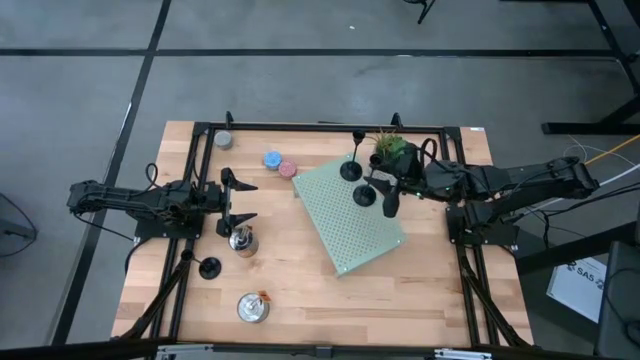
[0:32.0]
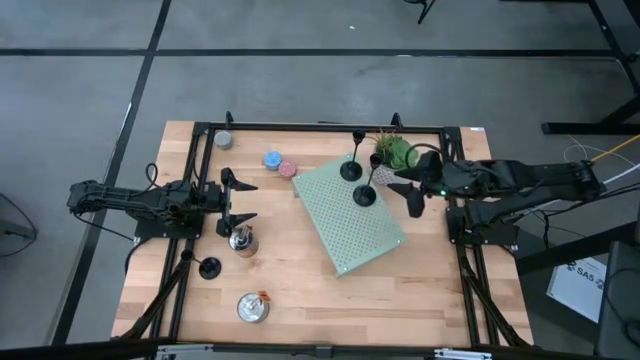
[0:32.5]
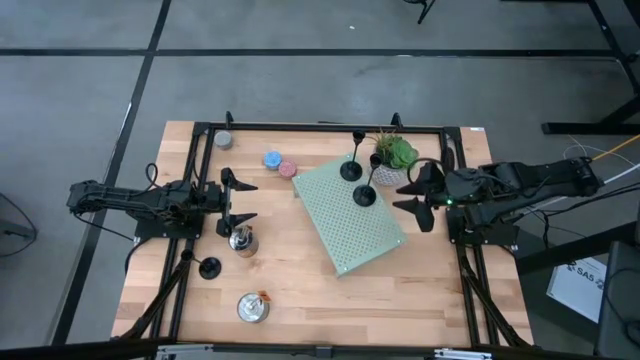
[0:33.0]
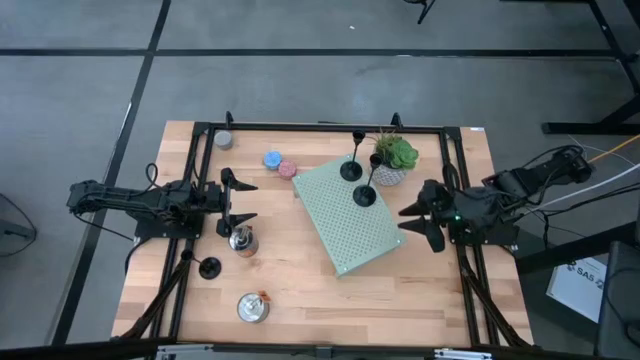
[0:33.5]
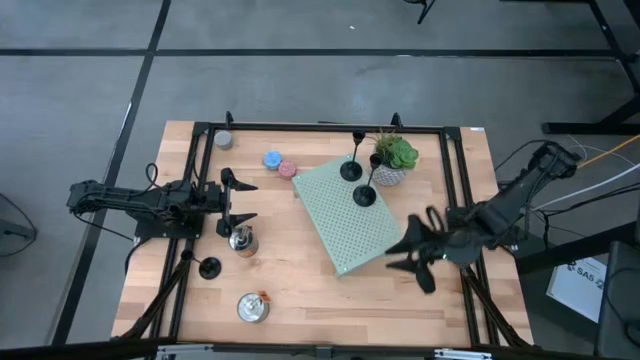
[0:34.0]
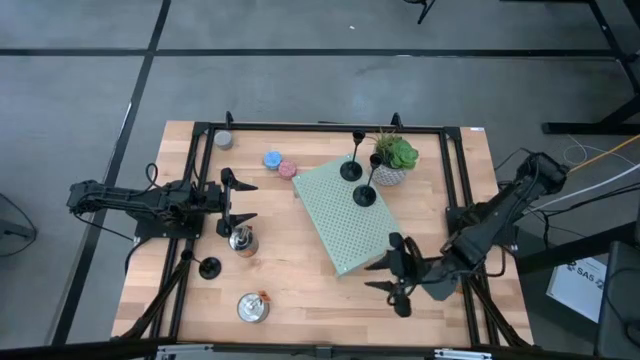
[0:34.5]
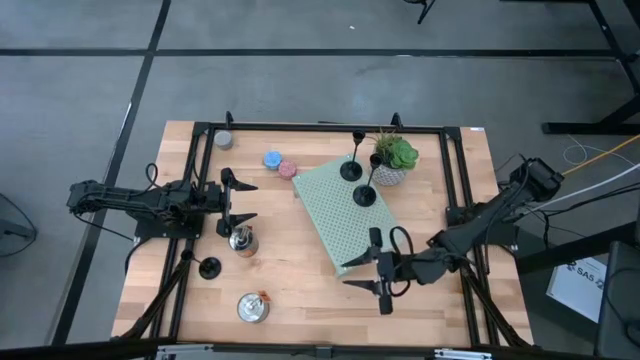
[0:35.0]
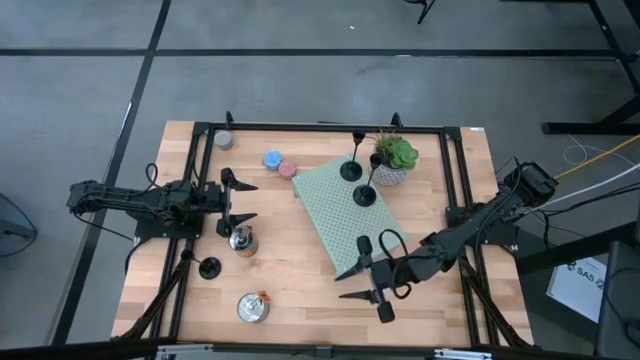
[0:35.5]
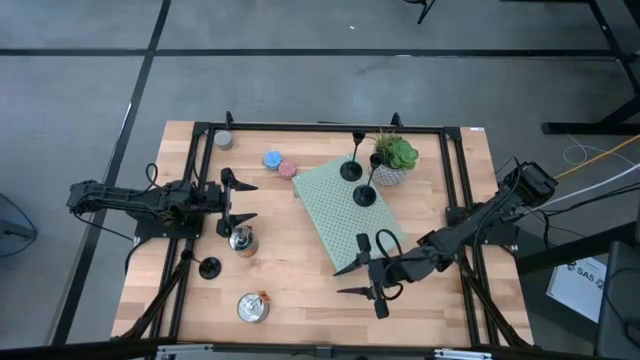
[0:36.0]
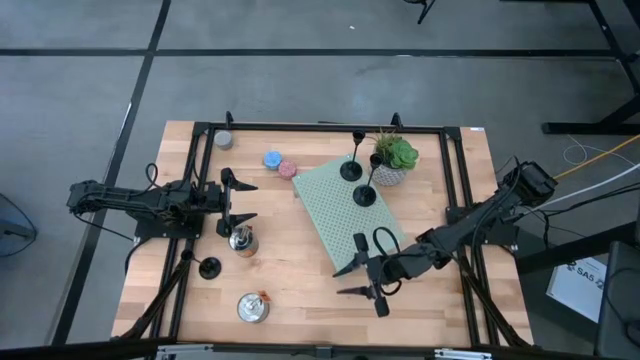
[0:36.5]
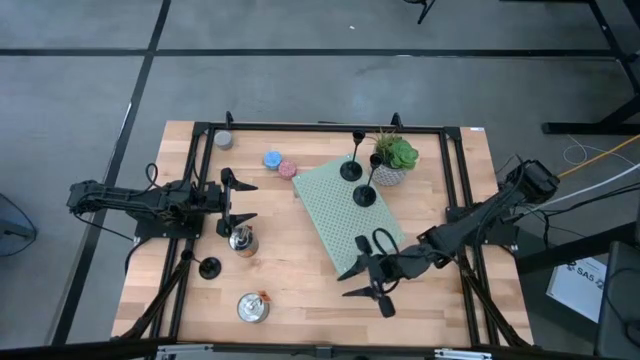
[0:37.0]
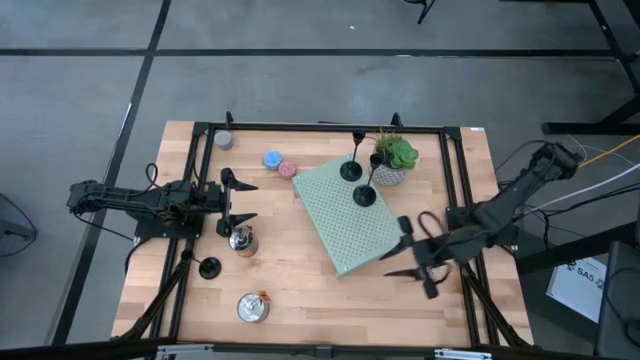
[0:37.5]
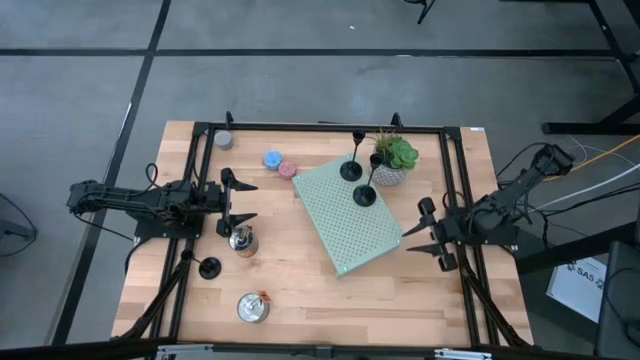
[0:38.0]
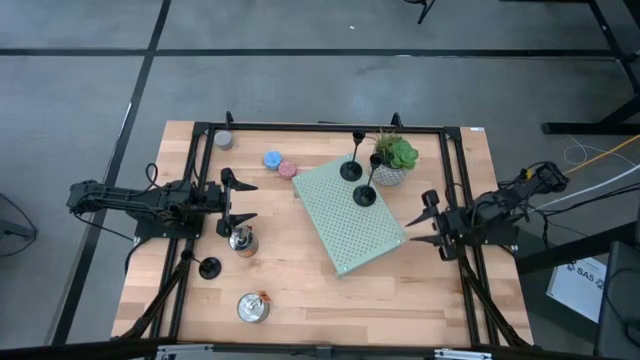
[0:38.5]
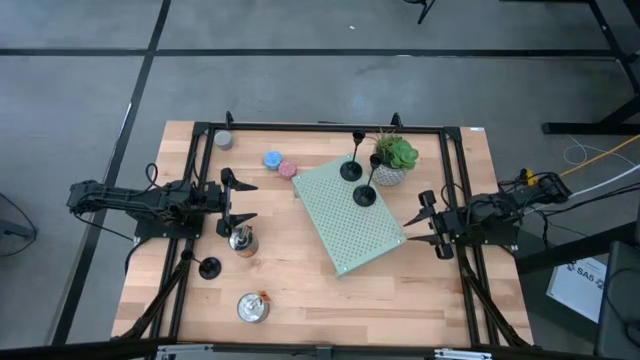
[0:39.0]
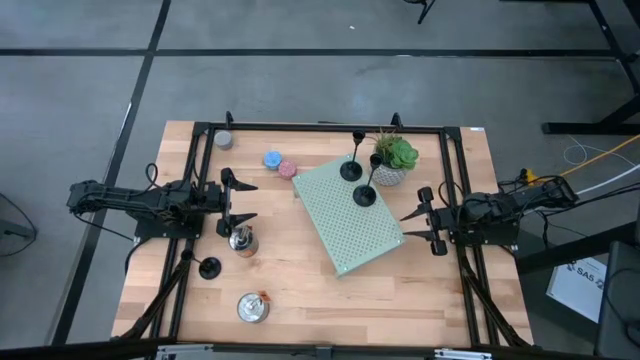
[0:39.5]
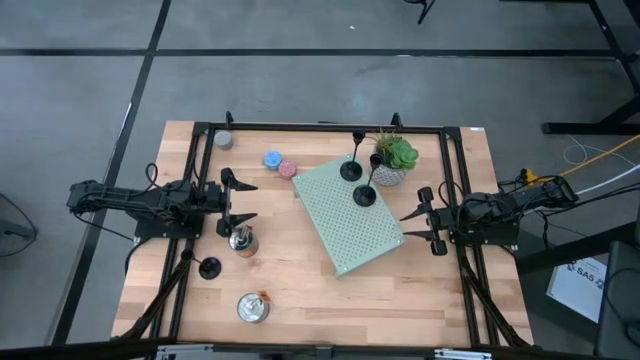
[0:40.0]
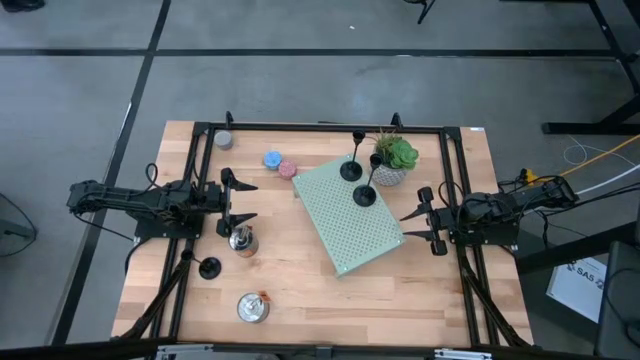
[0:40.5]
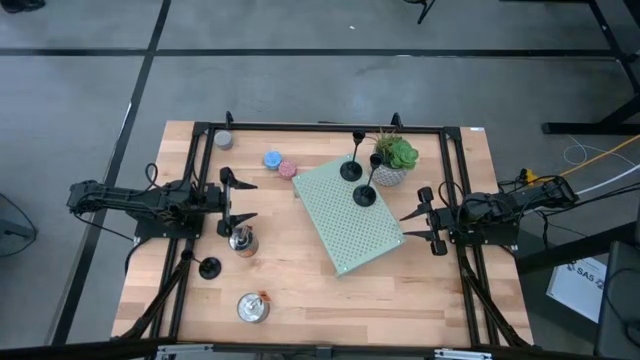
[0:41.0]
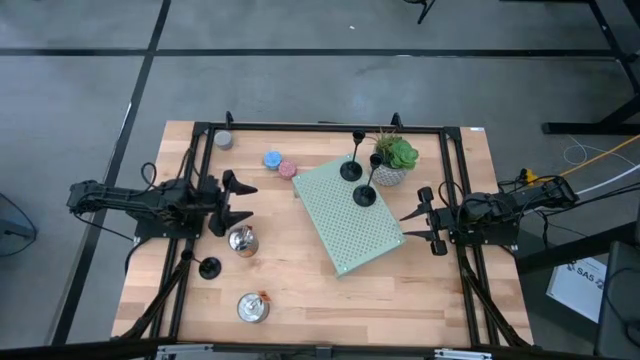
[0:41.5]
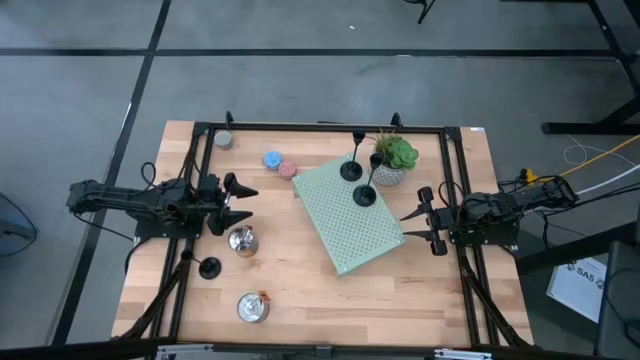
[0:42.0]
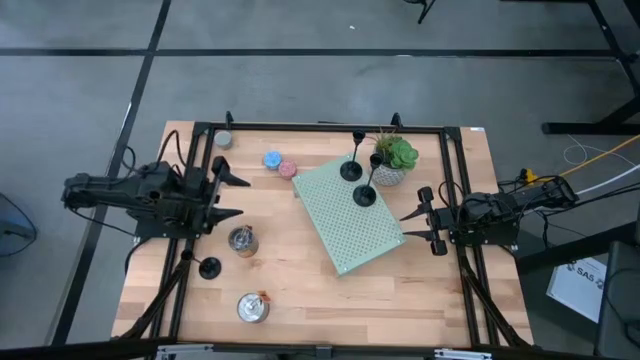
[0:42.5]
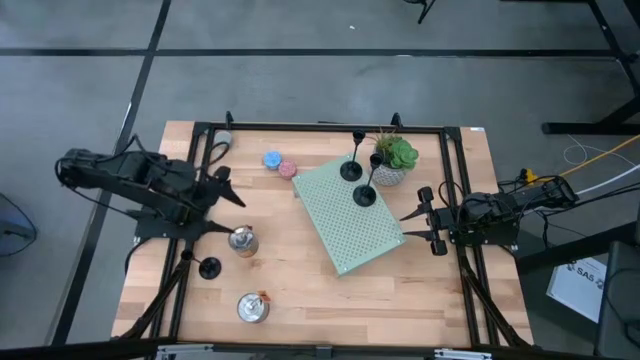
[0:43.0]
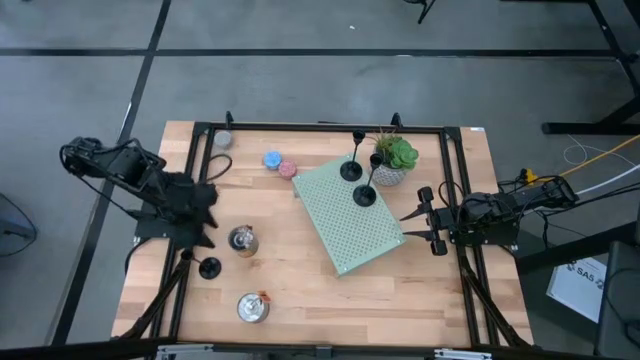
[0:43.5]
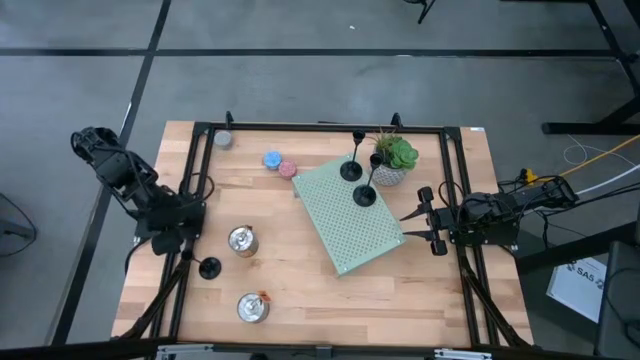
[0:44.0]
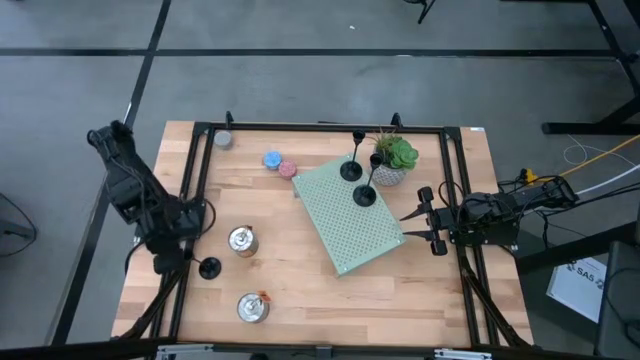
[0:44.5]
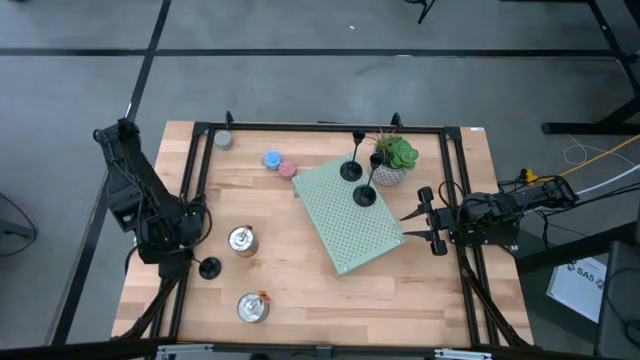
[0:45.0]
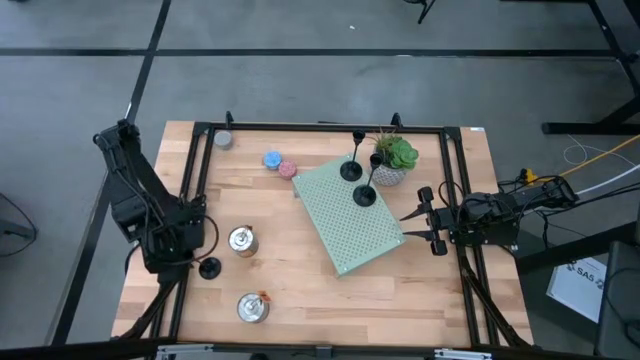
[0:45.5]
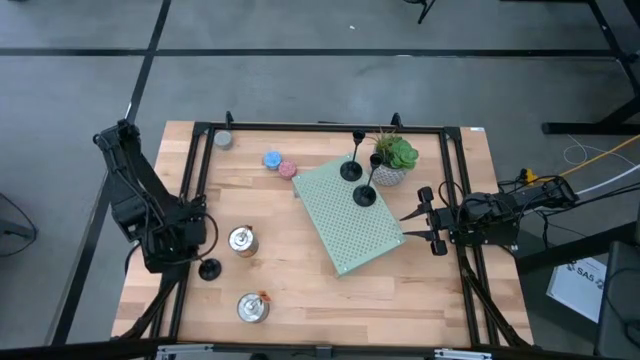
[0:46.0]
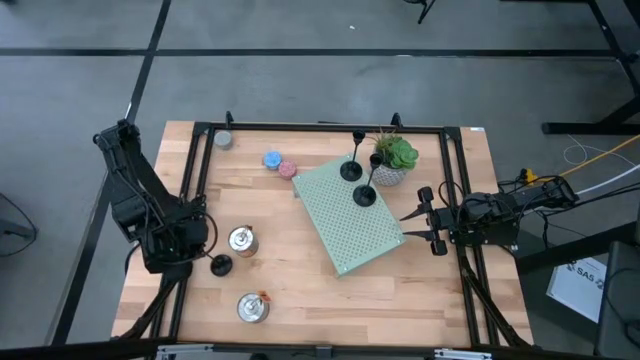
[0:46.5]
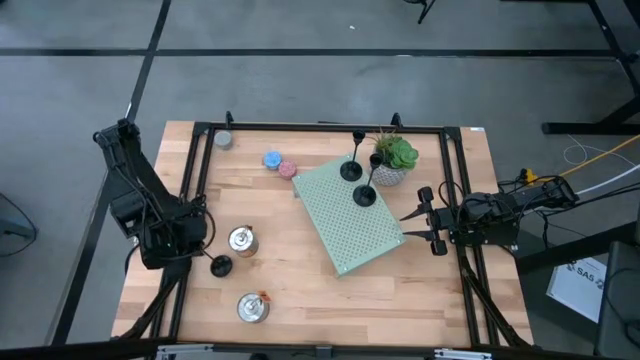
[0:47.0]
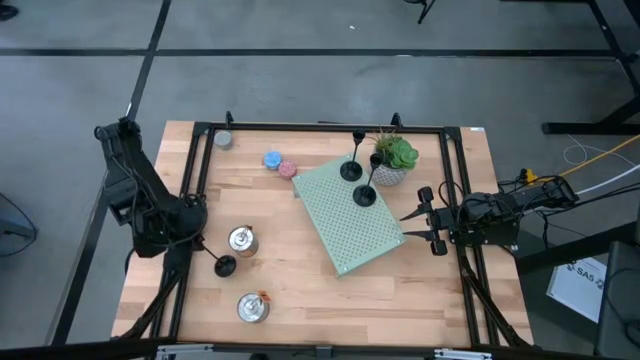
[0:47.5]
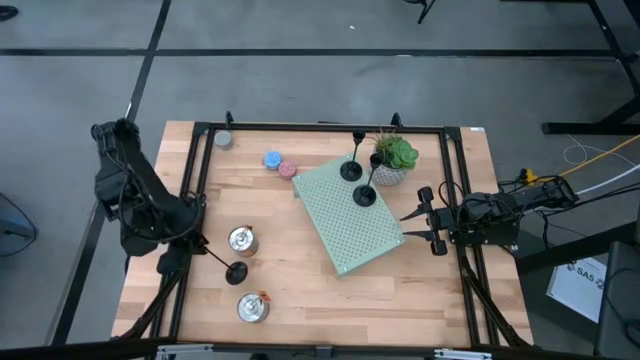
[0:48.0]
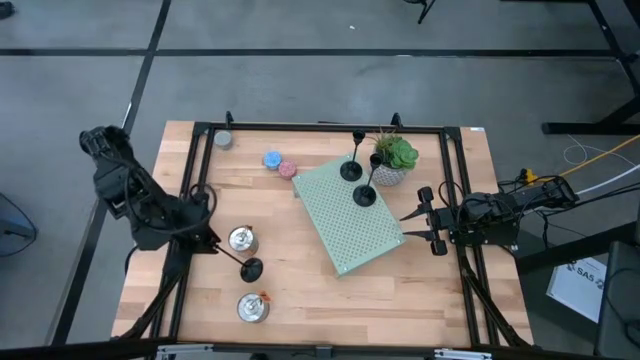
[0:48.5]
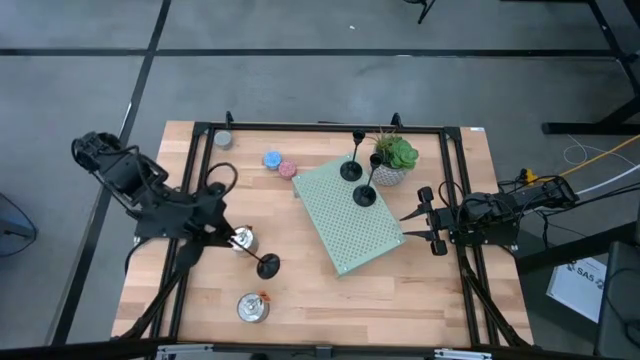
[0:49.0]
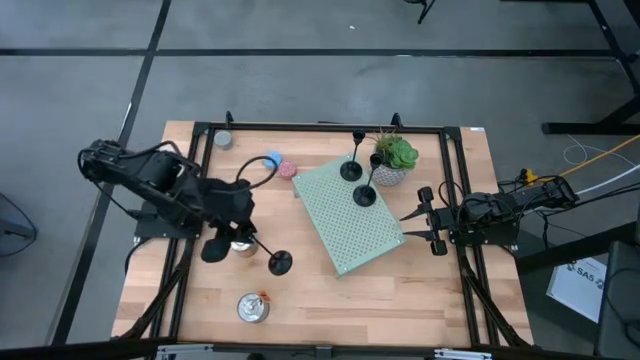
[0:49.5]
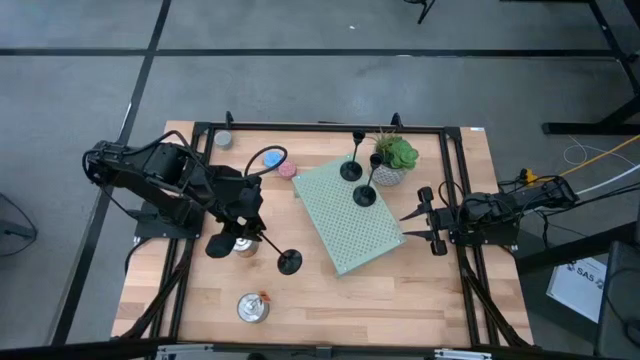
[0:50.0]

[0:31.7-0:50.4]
Task: Pick & Place candle stick holders
Put the black candle holder on the shelf aligned with the other candle holders

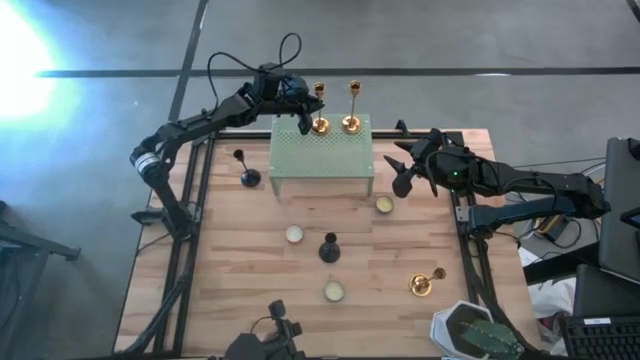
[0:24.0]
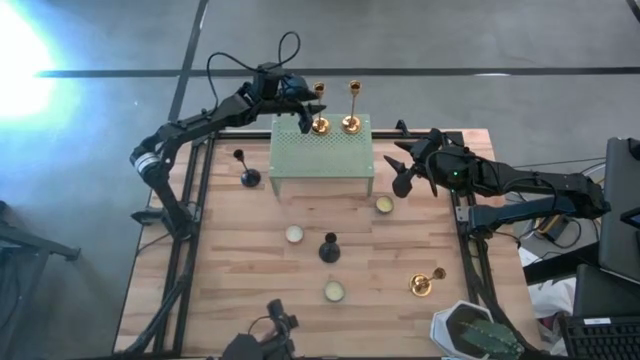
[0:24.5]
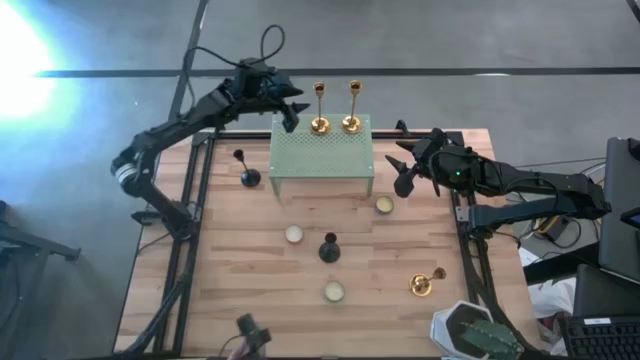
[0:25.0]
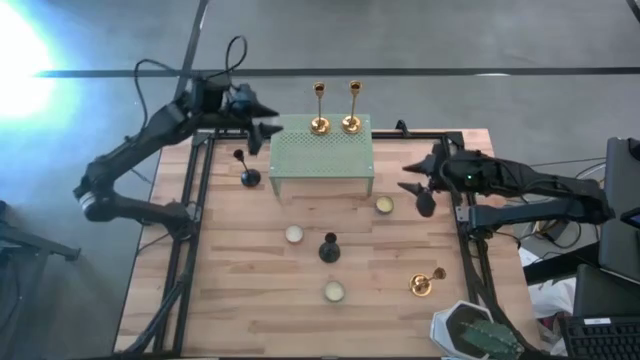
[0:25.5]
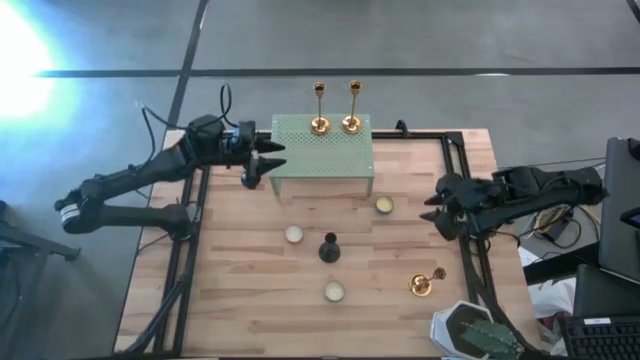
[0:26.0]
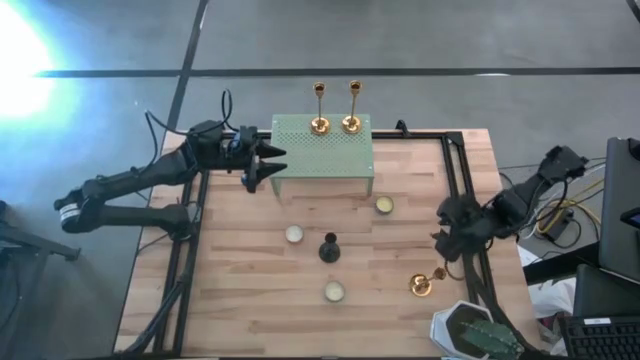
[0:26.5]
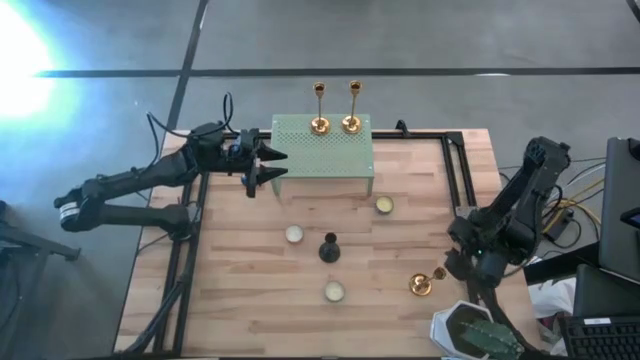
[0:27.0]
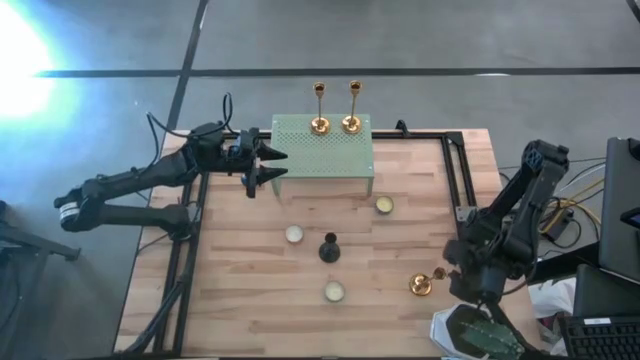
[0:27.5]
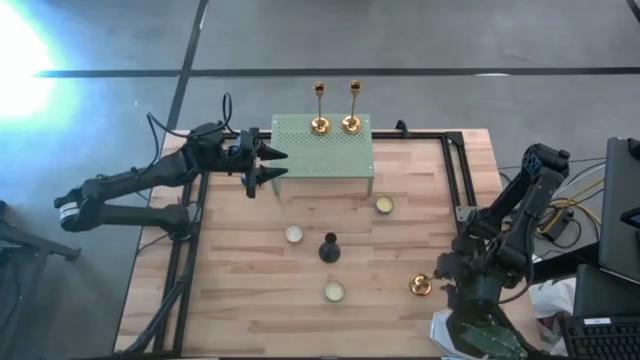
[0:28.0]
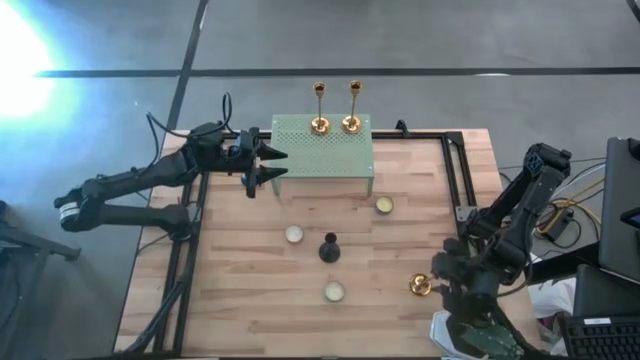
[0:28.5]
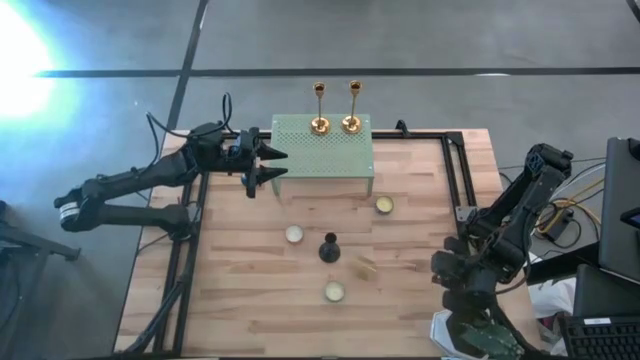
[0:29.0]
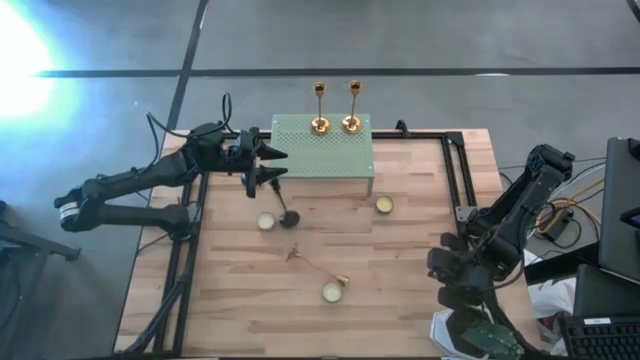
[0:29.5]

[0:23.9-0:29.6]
Task: Pick & Place candle stick holders
Align the gold candle holder with the other gold candle holders on the shelf
